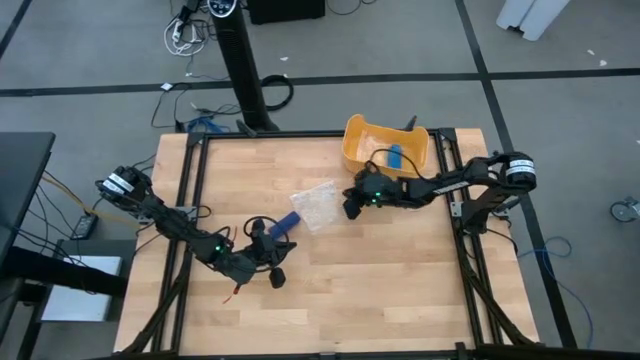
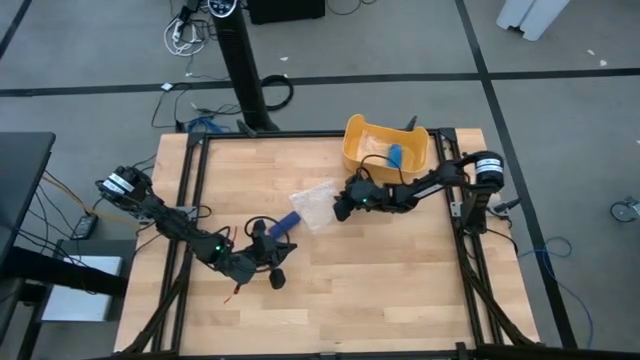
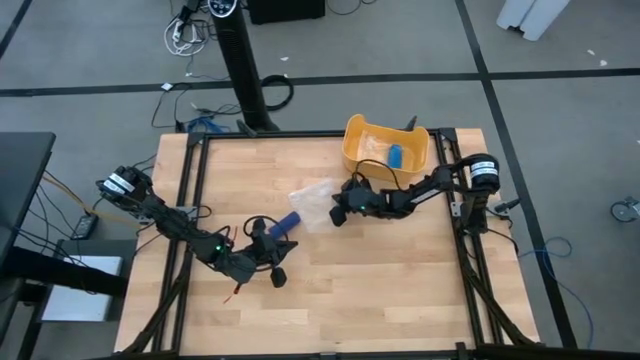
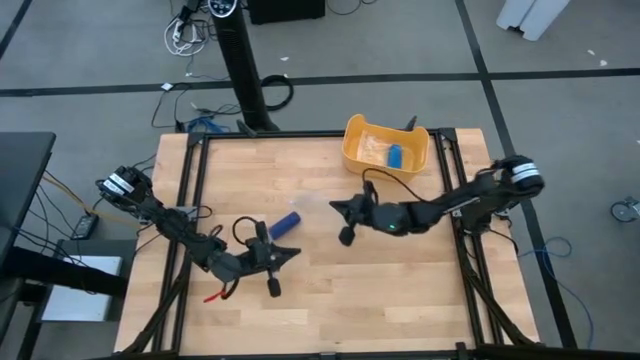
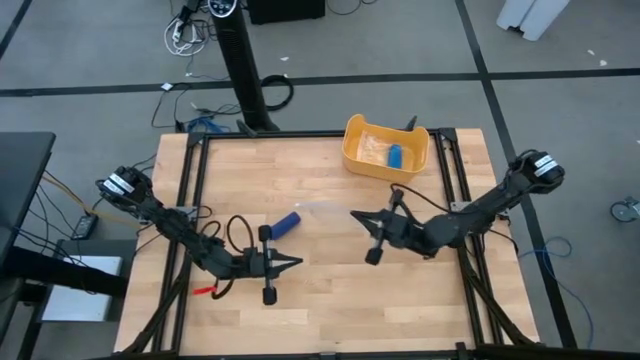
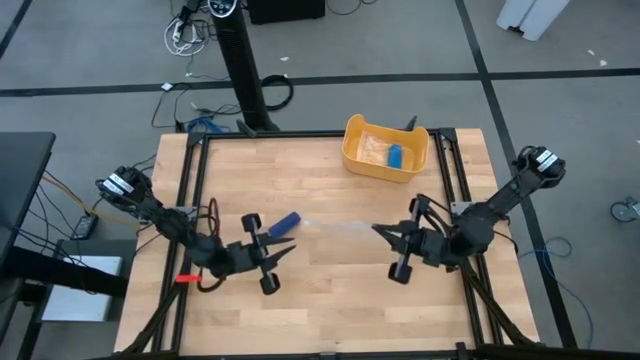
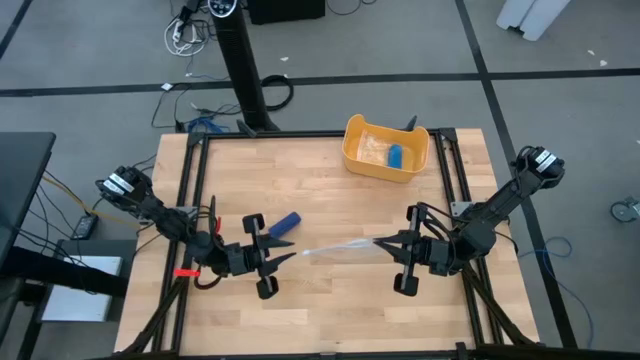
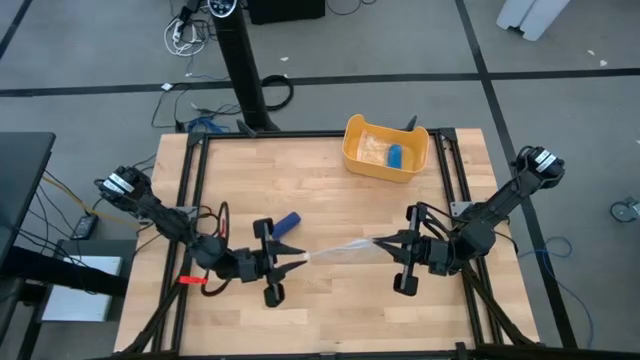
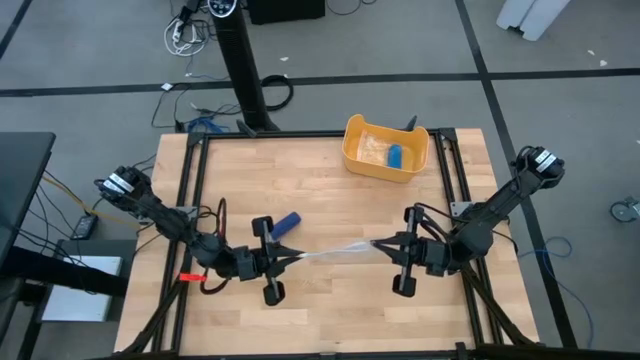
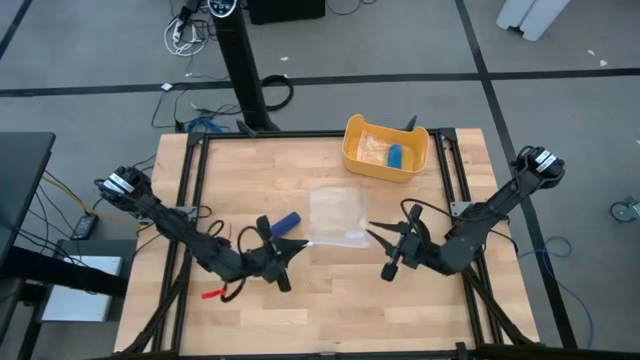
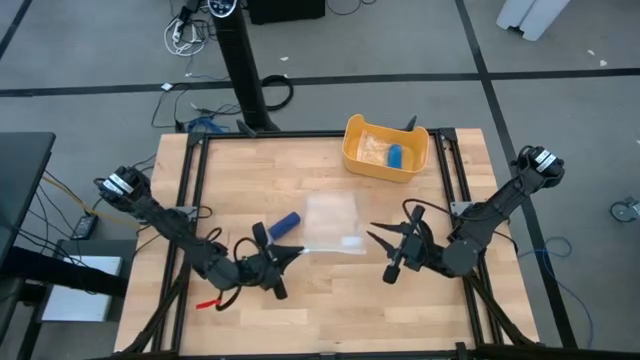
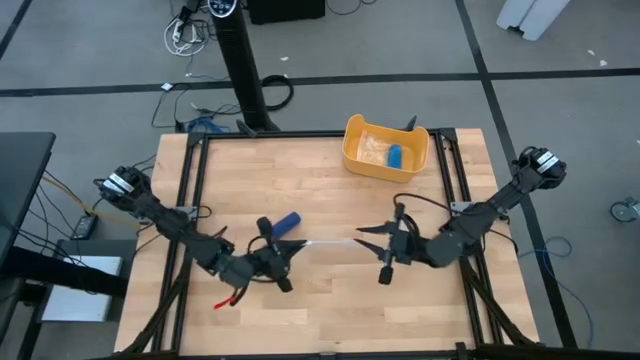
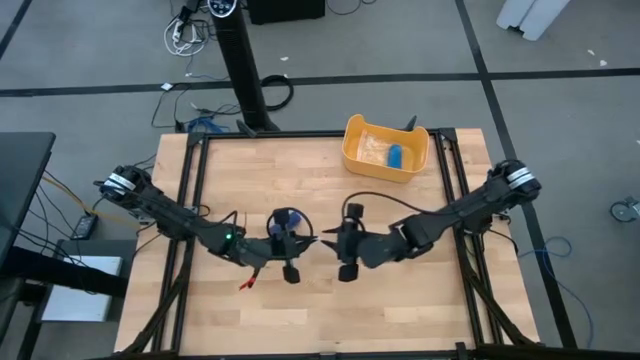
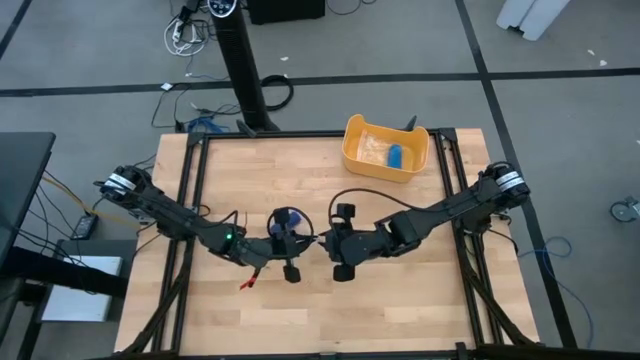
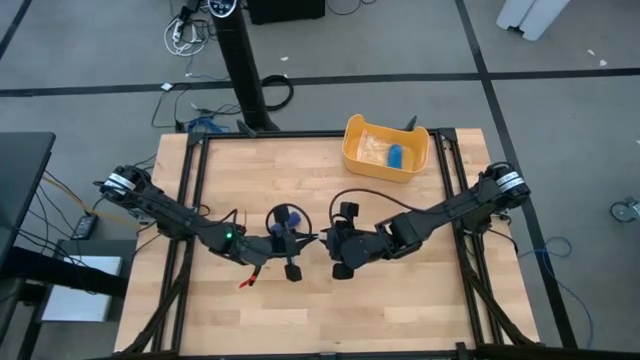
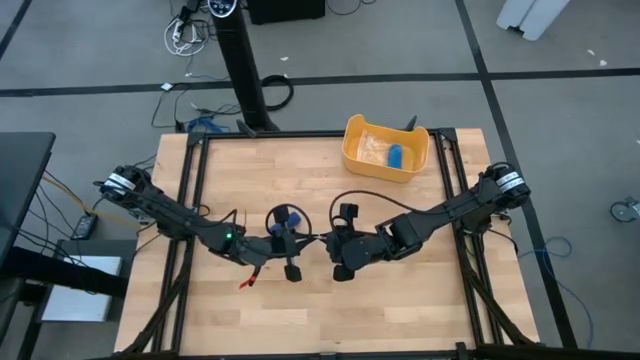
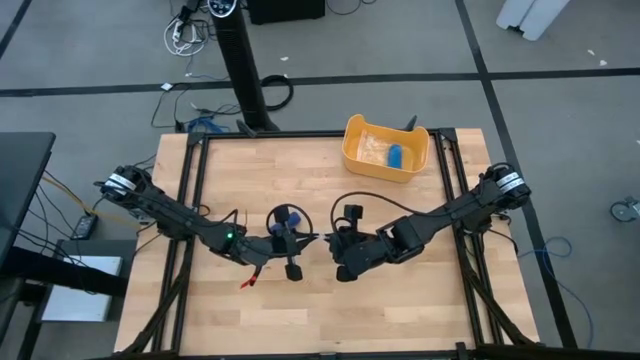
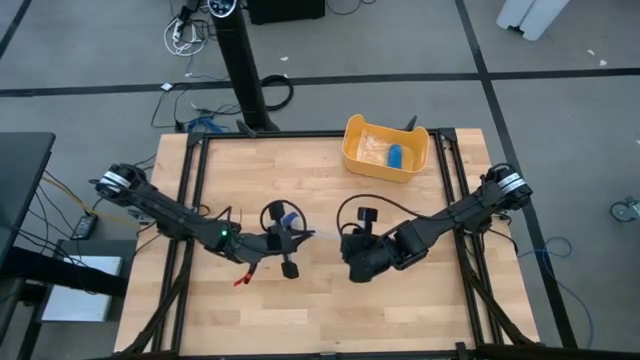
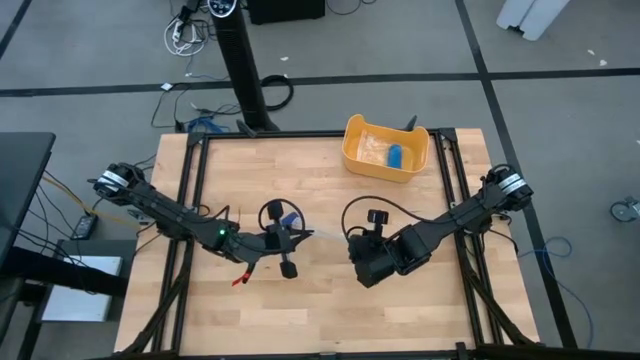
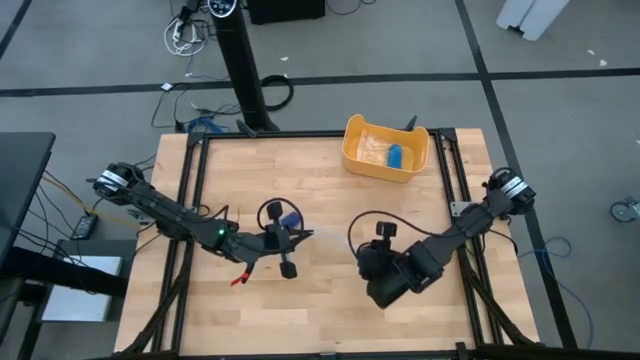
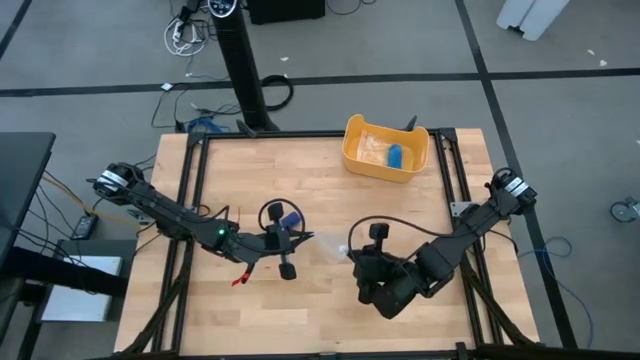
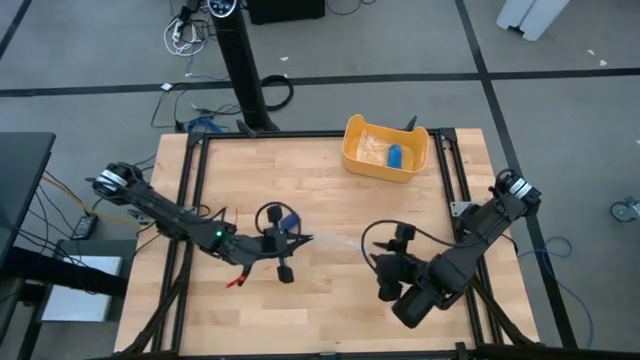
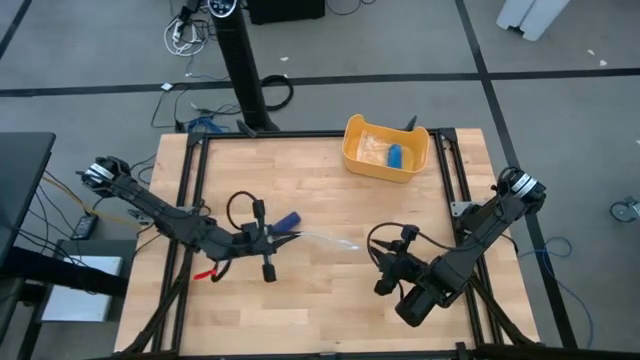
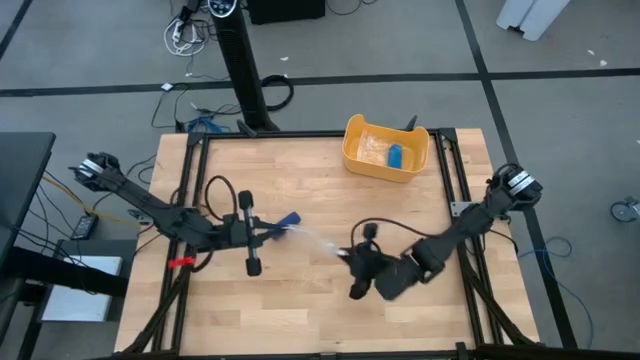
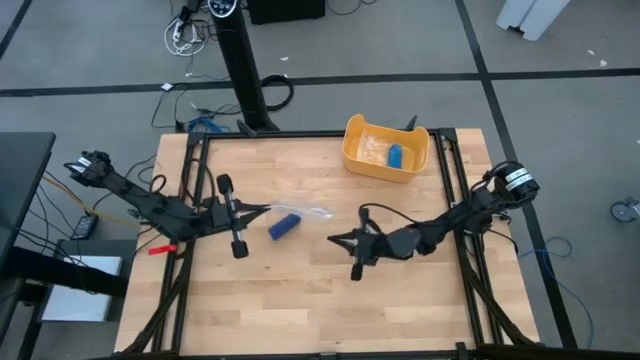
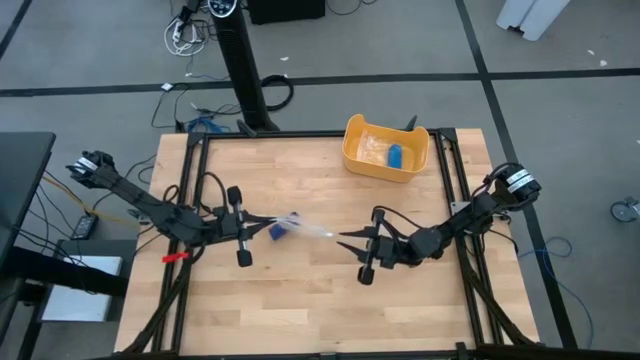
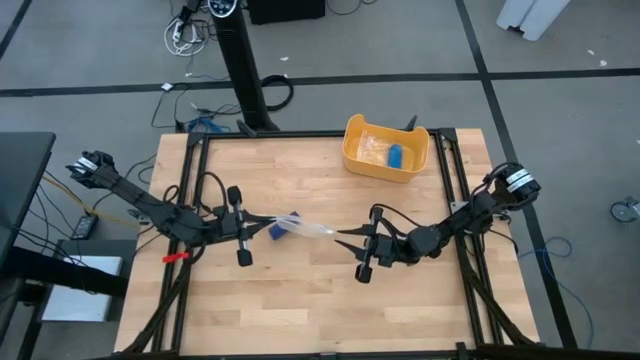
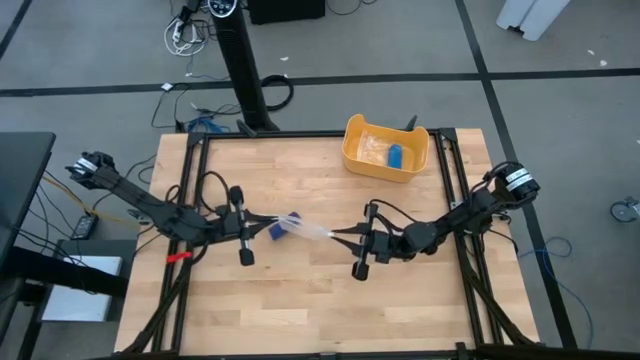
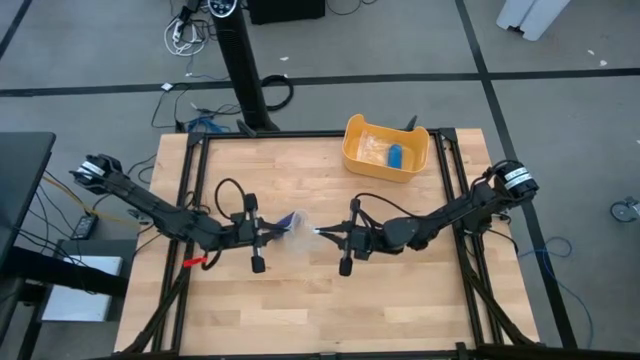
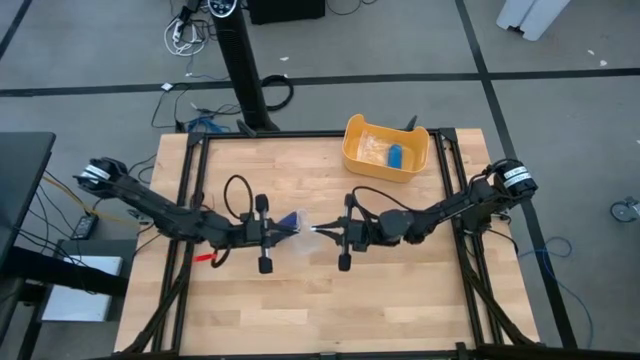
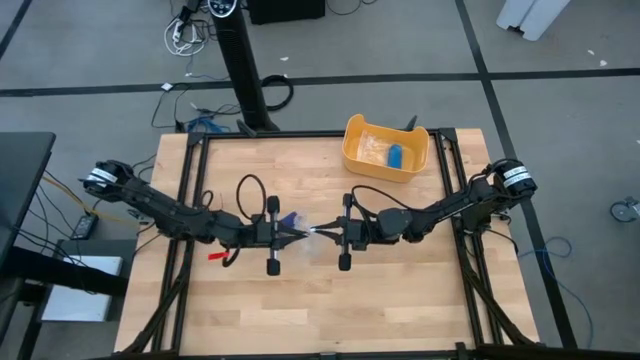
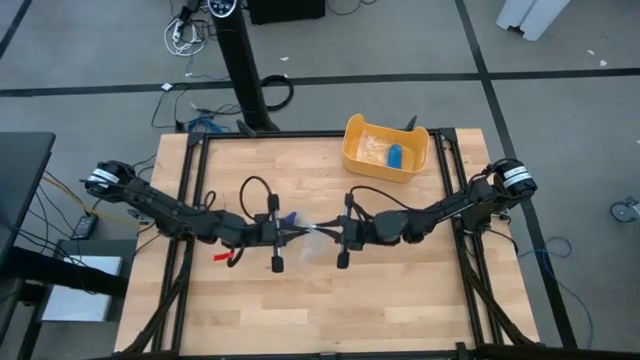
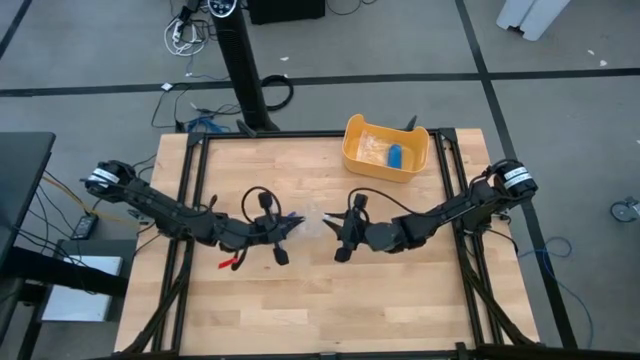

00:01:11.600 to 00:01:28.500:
Task: Roll bandage
Open the transparent zip bag

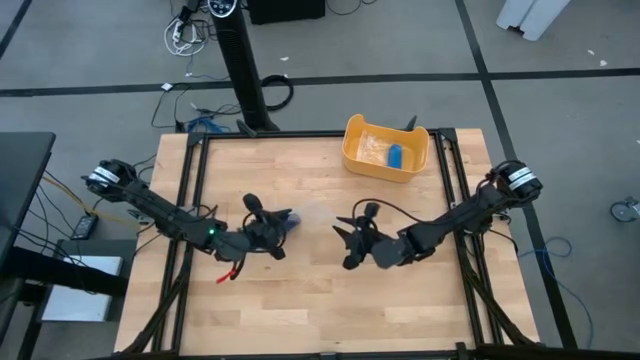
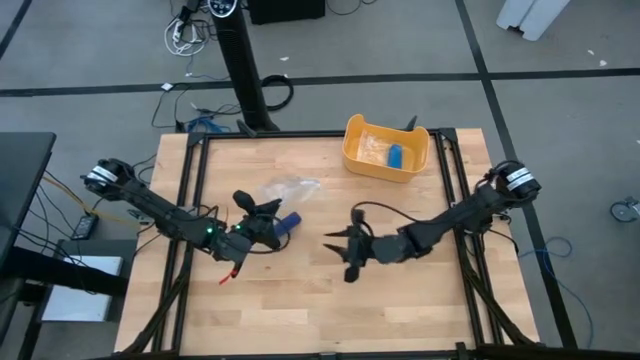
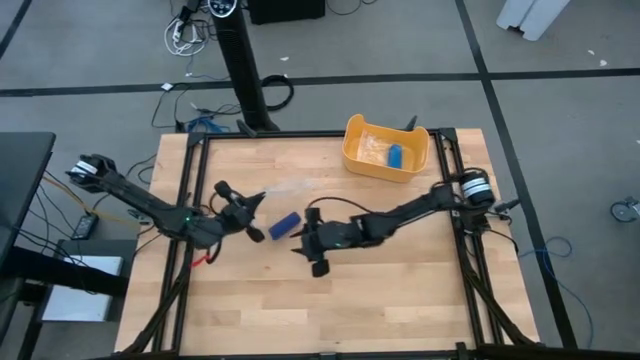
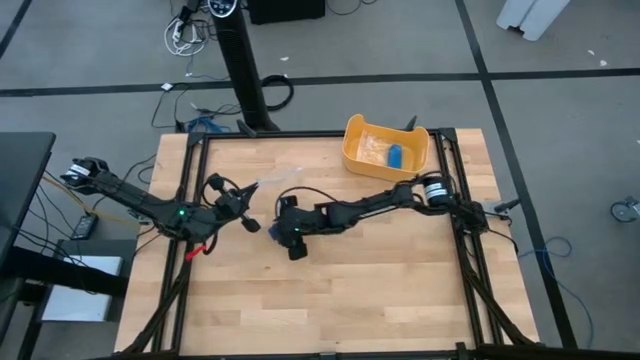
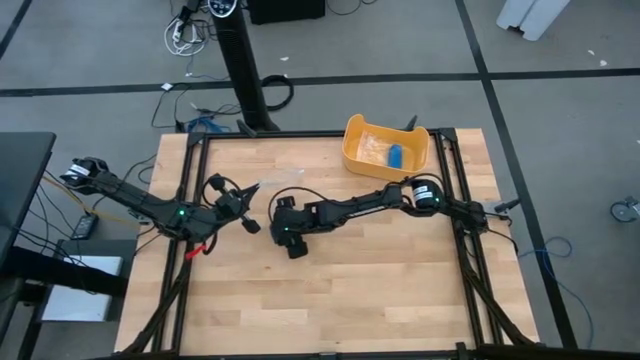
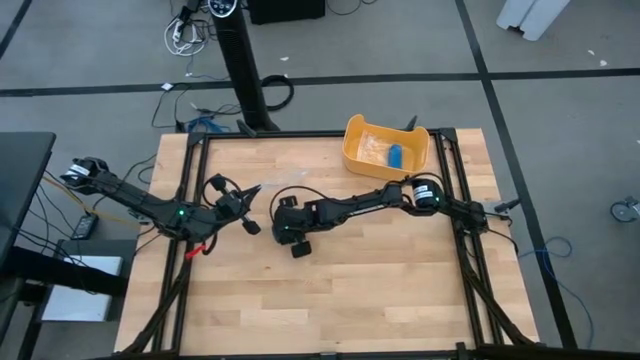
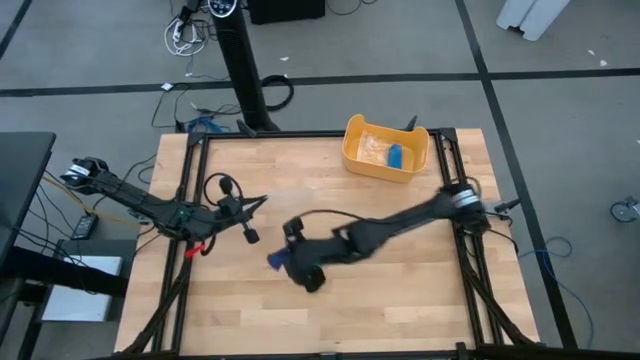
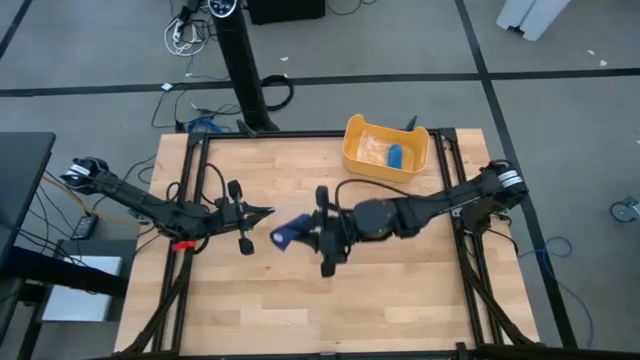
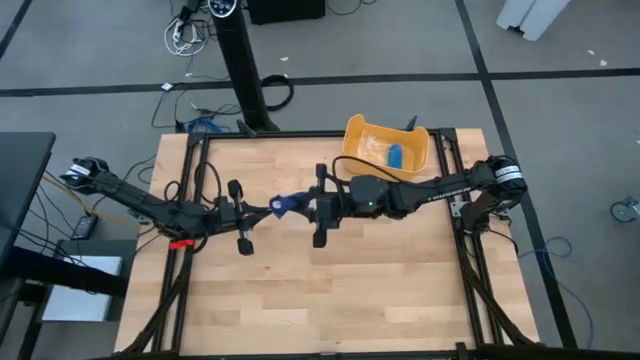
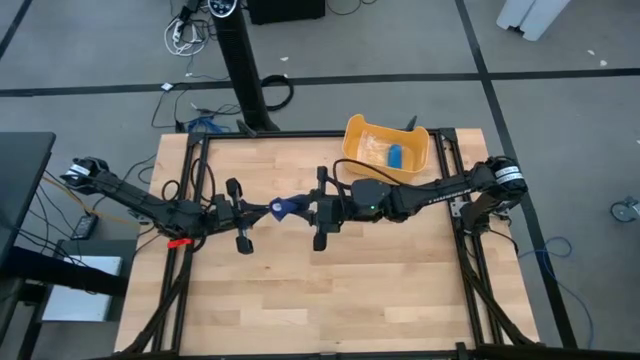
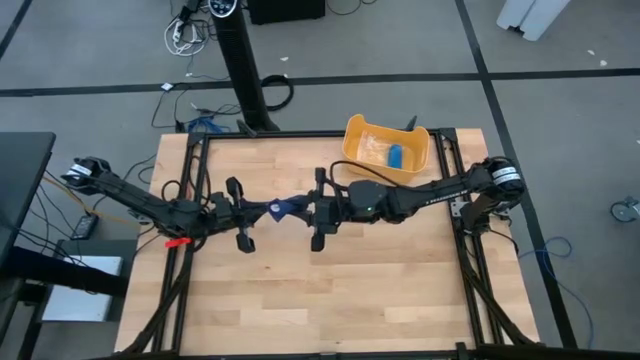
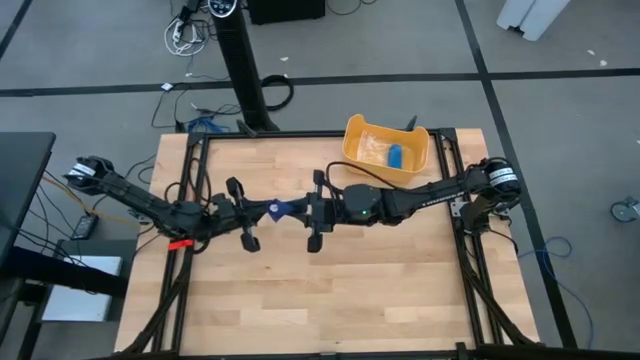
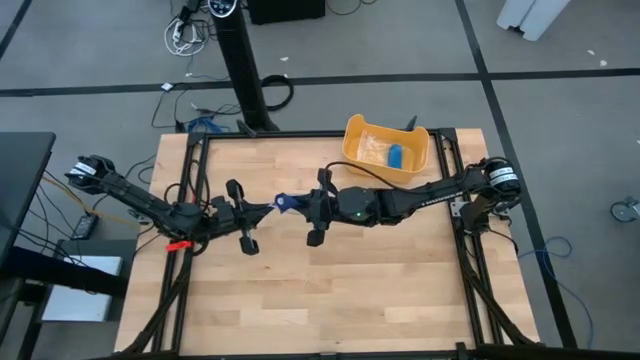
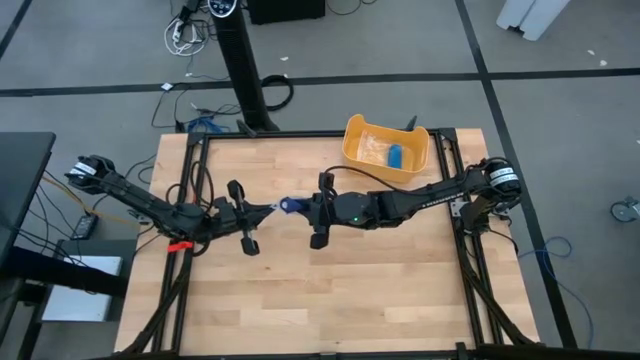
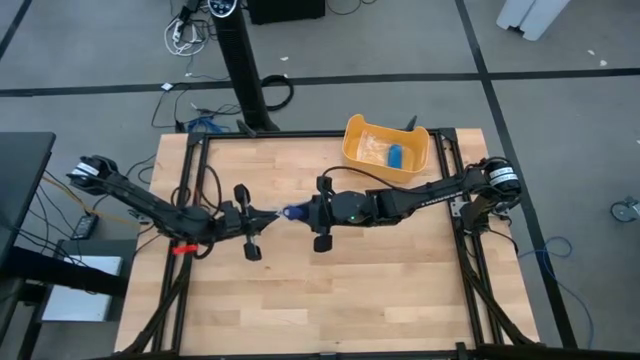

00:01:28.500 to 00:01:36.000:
Put the violet bandage into the transparent zip bag
